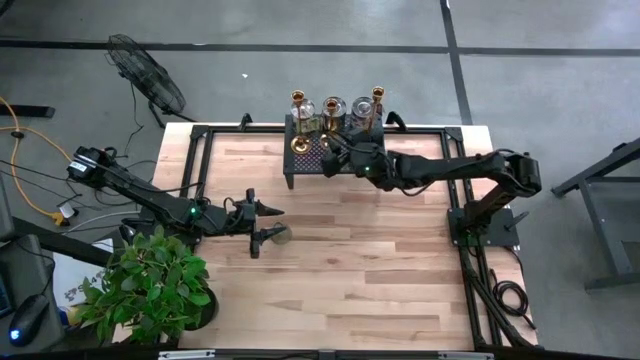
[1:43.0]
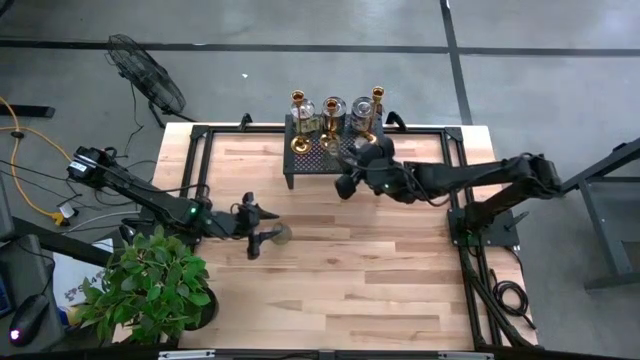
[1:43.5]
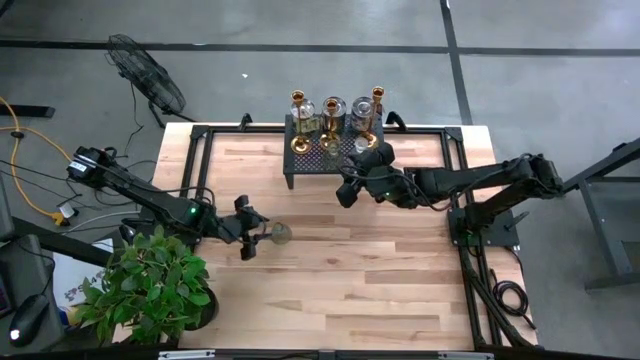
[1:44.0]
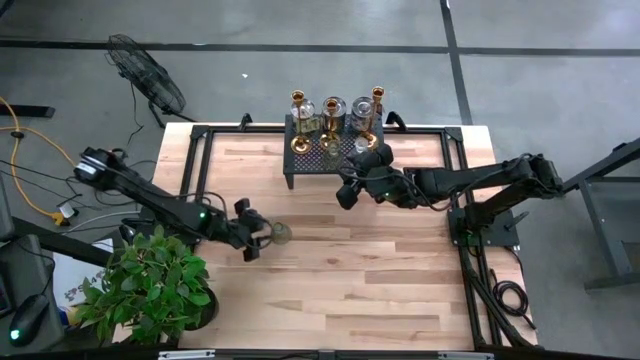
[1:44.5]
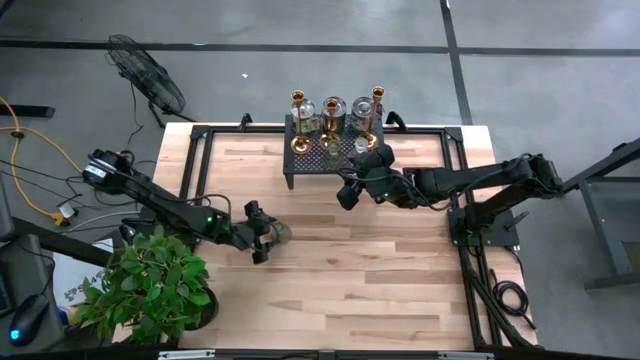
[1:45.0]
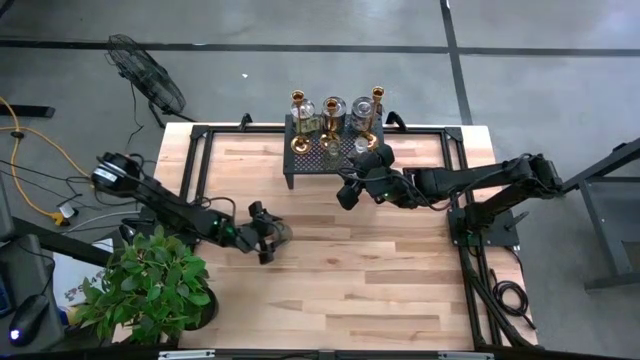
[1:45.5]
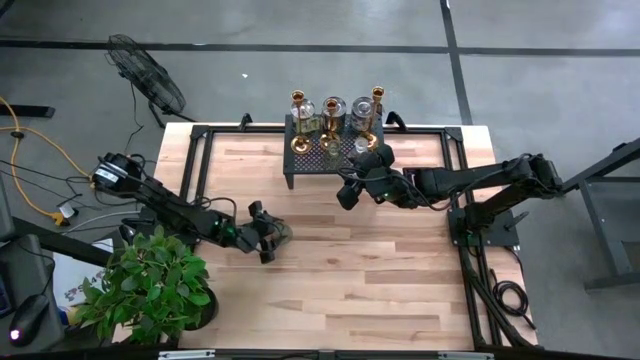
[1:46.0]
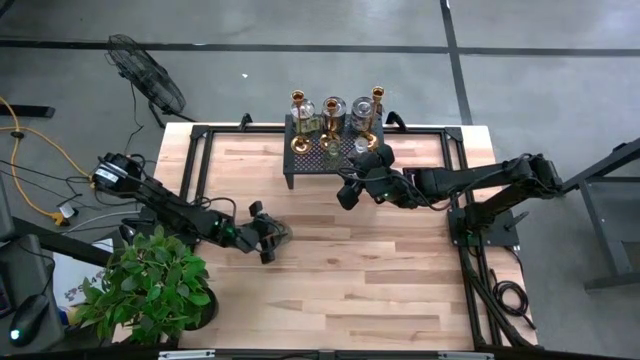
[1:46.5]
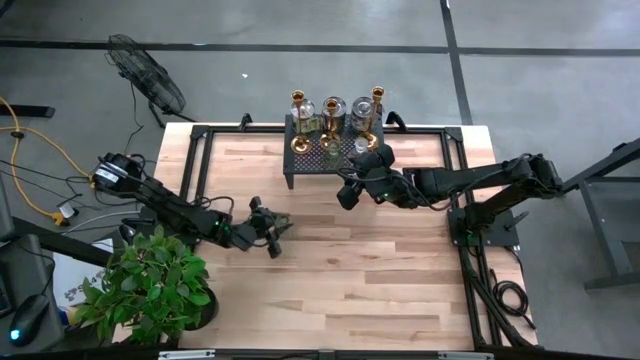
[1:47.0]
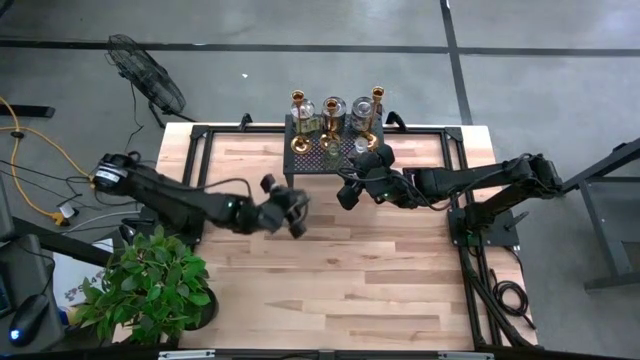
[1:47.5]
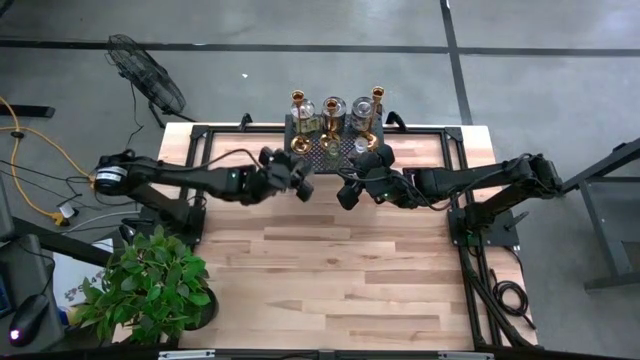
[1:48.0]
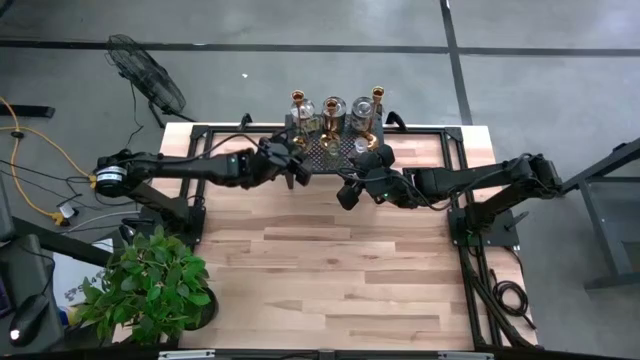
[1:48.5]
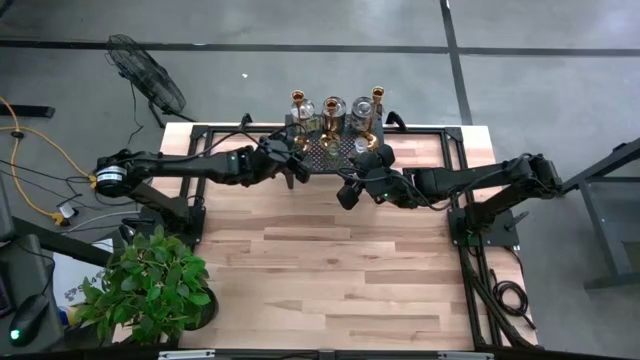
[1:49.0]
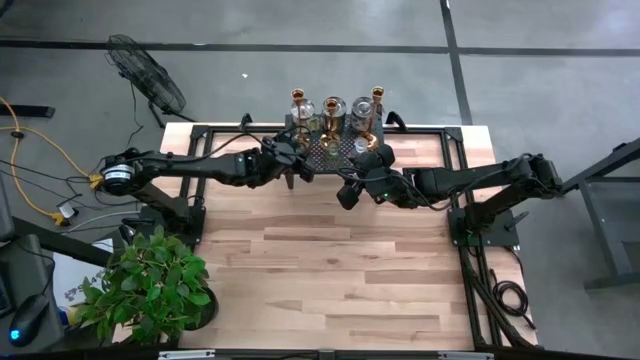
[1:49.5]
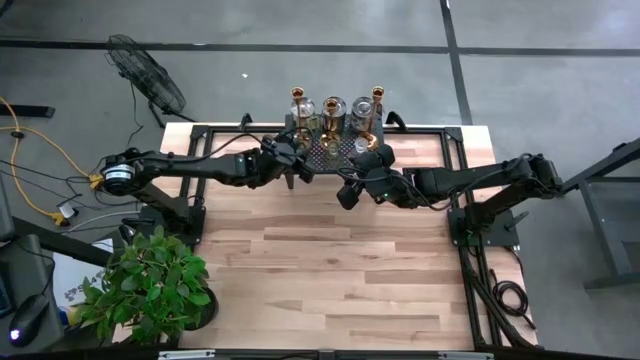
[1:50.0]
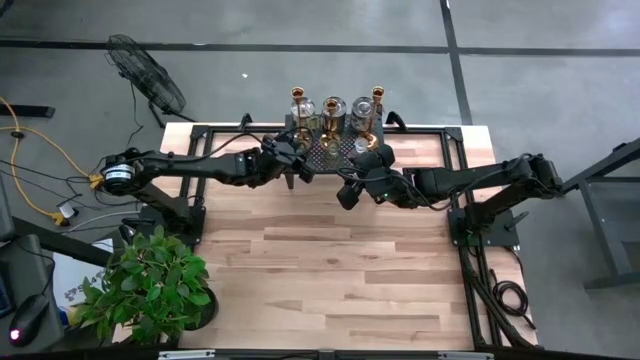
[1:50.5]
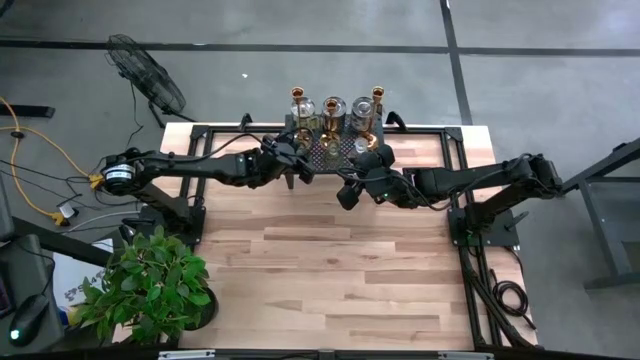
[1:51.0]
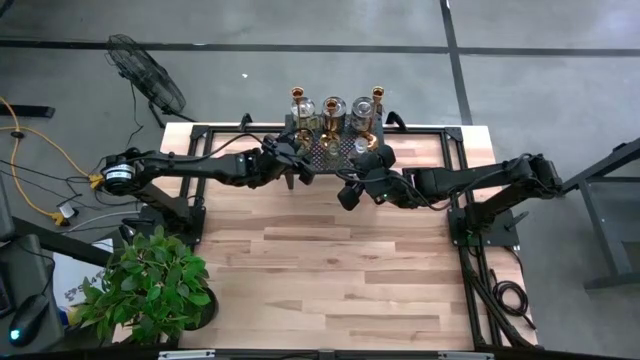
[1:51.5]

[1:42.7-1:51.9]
Task: Stock candles on shelf
Put the gray candle holder on the shelf

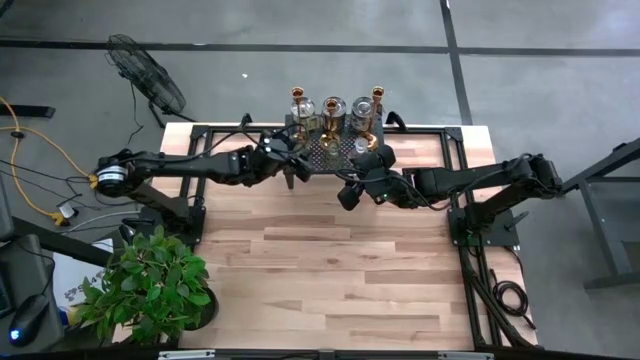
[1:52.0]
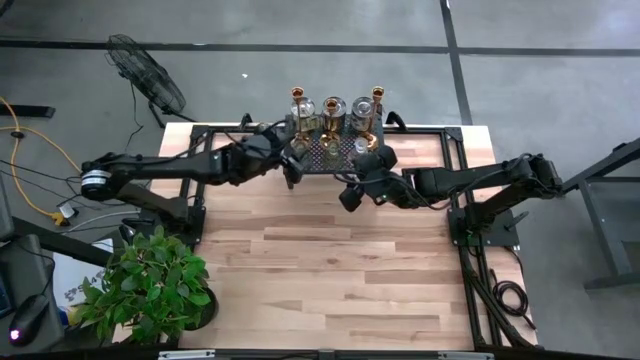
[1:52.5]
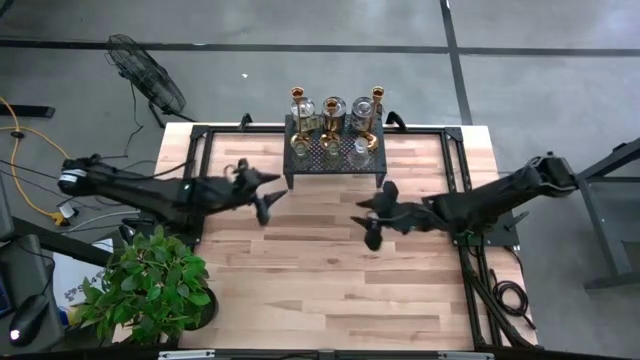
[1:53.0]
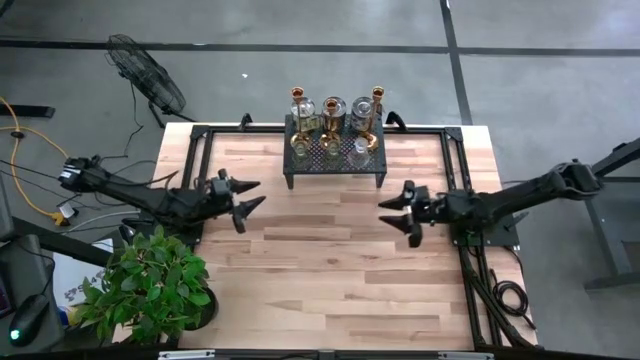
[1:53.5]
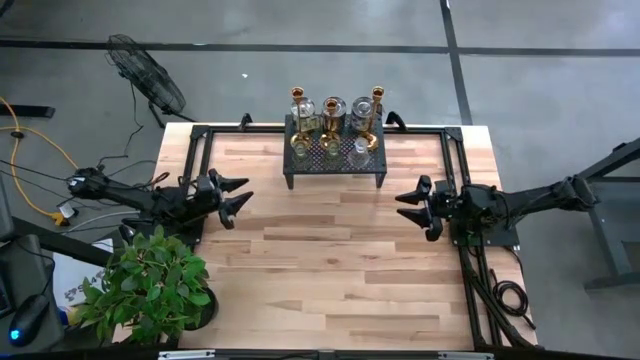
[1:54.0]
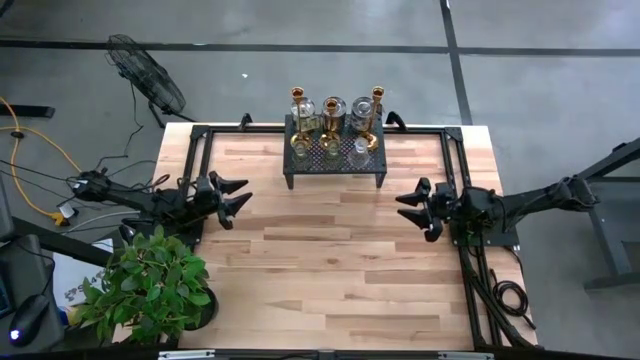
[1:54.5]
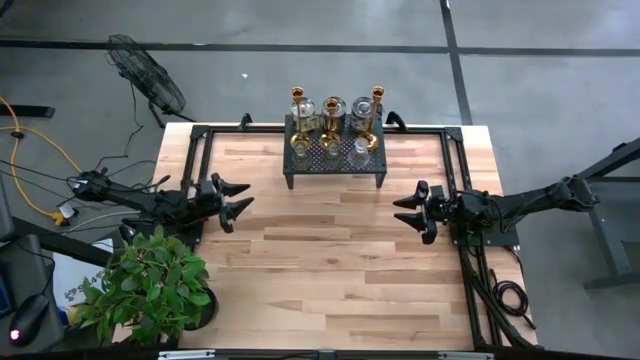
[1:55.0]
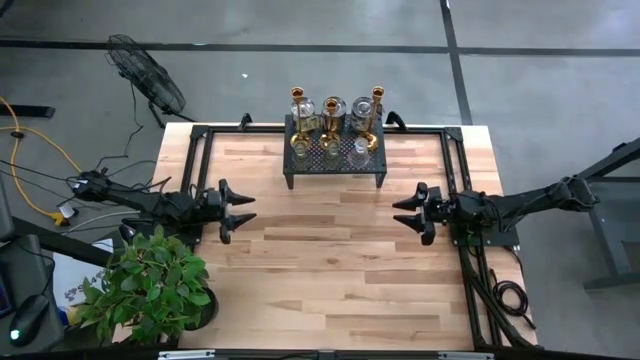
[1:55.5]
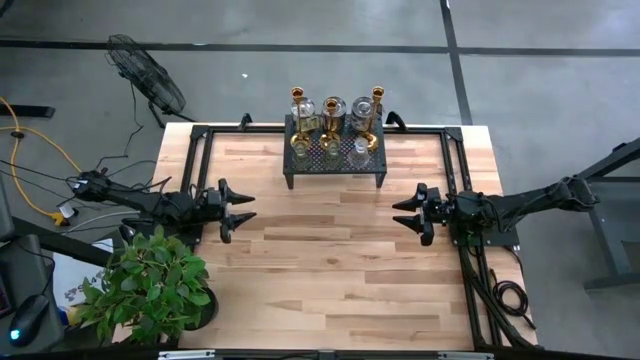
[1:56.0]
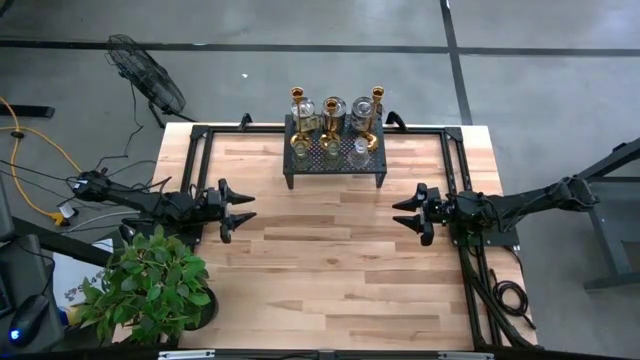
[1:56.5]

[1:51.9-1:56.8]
Return to Home Position

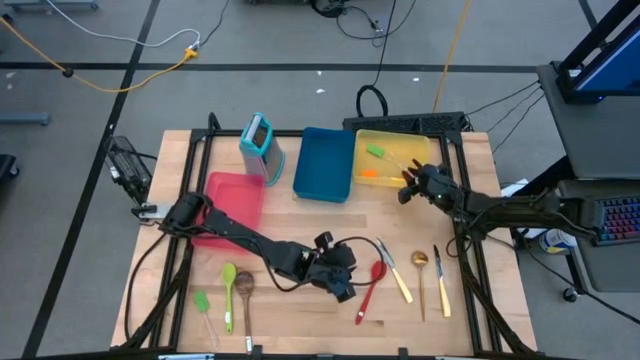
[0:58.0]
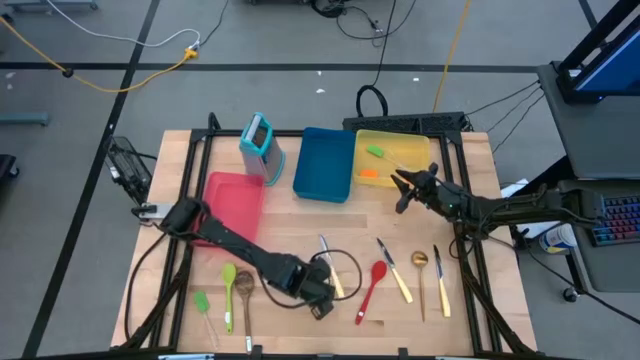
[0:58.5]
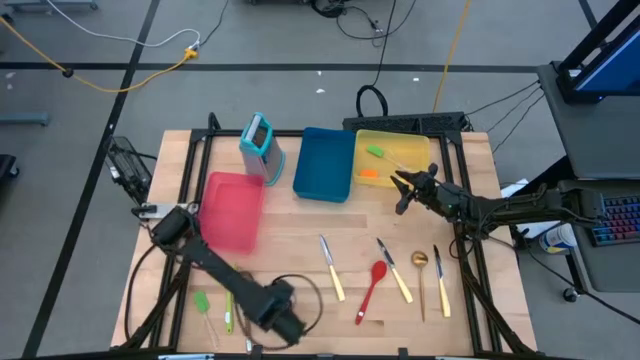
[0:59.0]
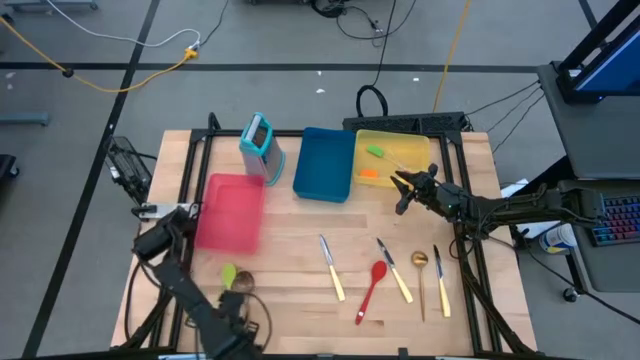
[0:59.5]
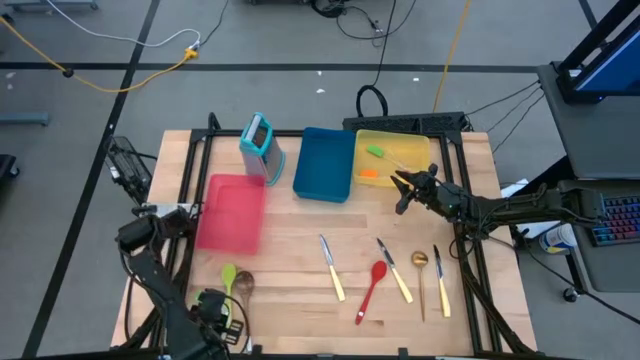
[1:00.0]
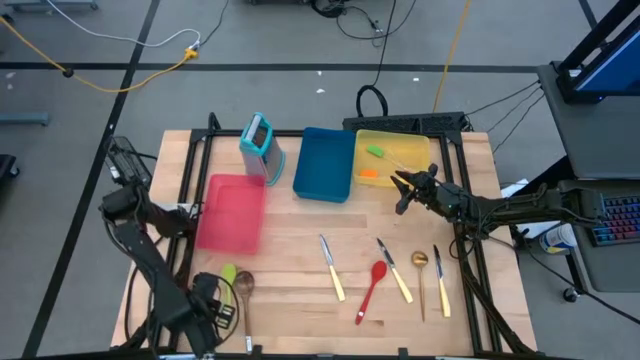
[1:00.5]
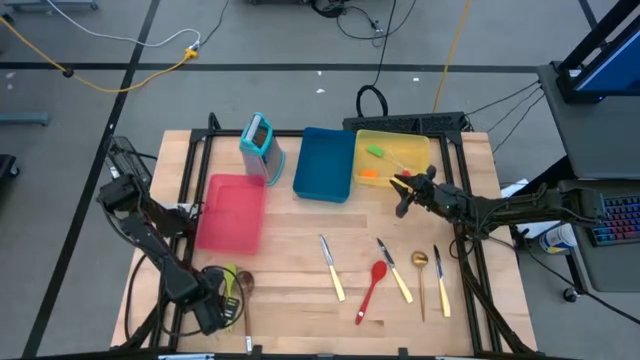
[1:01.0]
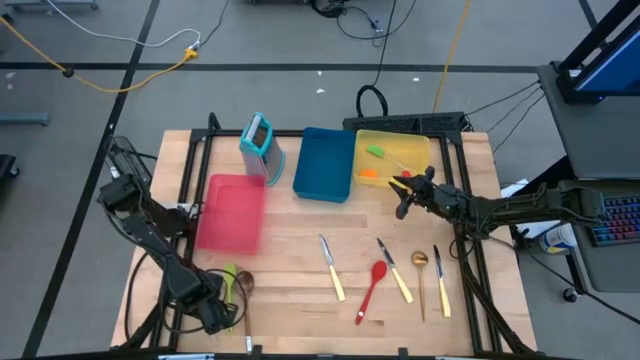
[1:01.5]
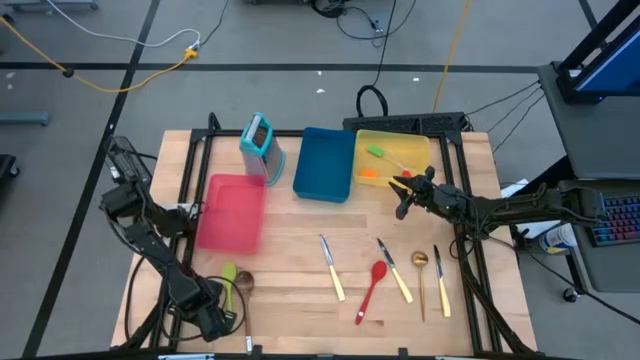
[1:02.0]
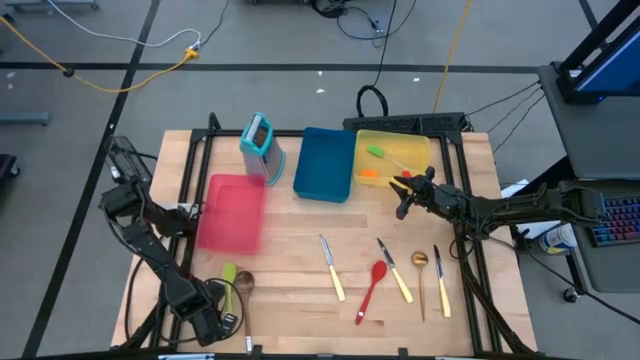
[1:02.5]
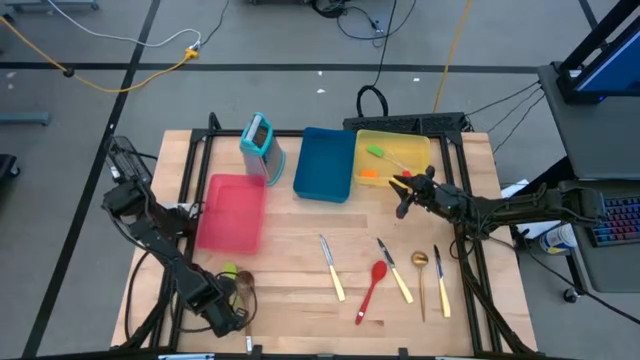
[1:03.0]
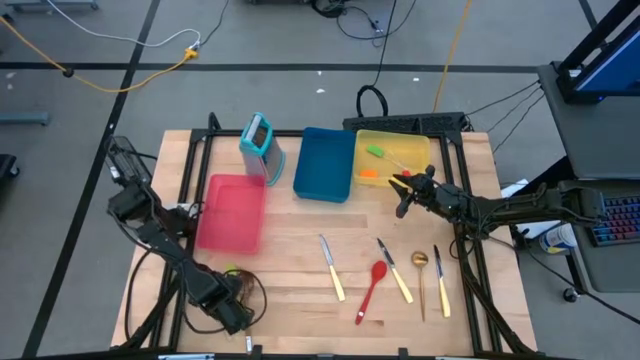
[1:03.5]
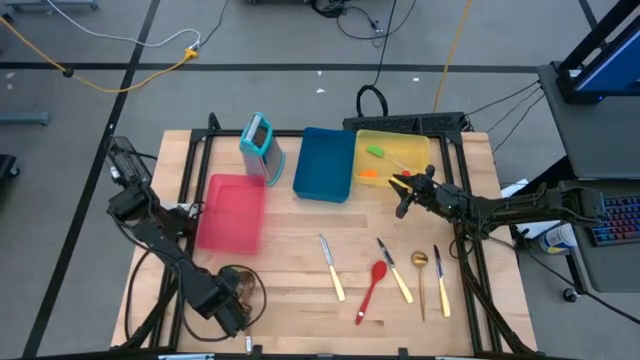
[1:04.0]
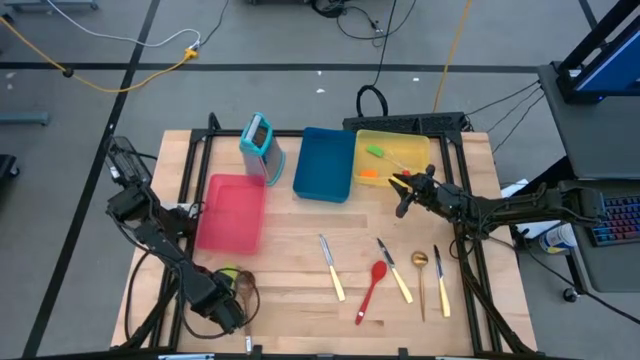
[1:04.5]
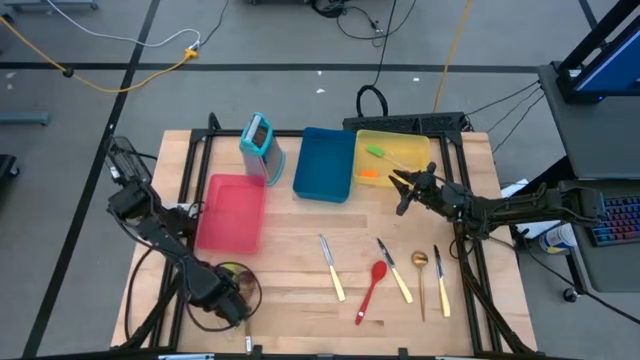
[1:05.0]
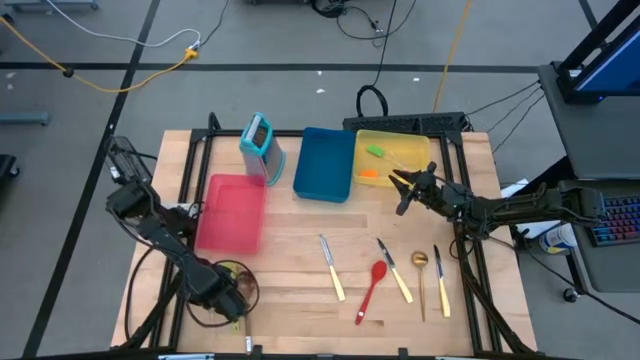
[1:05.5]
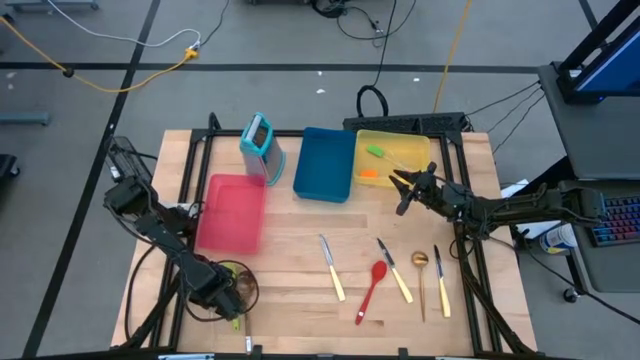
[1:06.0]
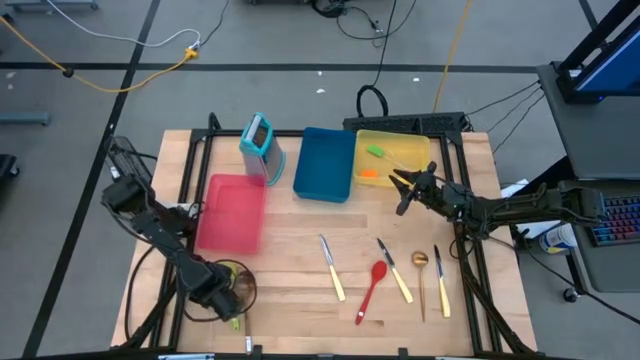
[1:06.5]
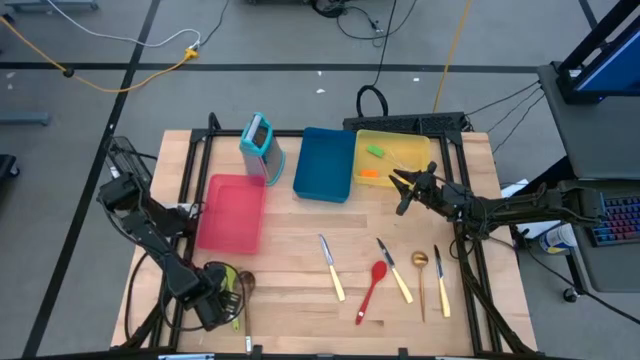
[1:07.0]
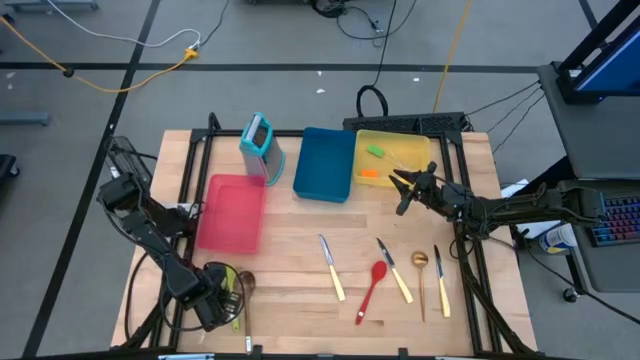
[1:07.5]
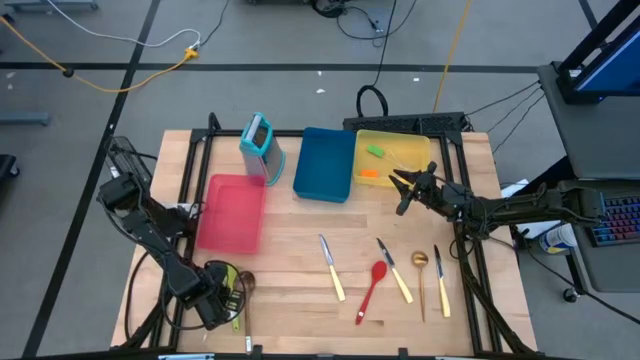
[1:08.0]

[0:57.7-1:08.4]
Task: Pick & Place Kitchen Items
Put the green spatula into the yellow bin
